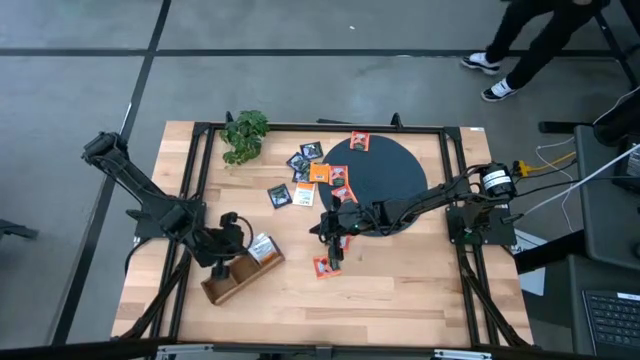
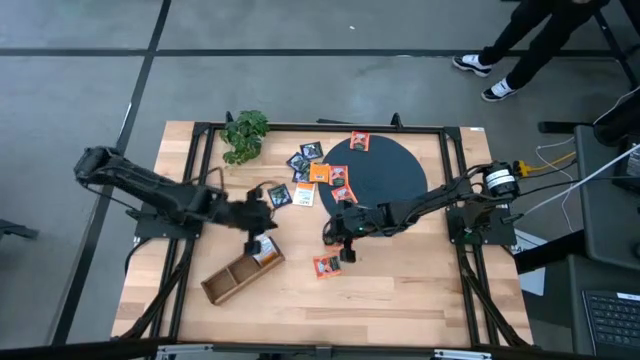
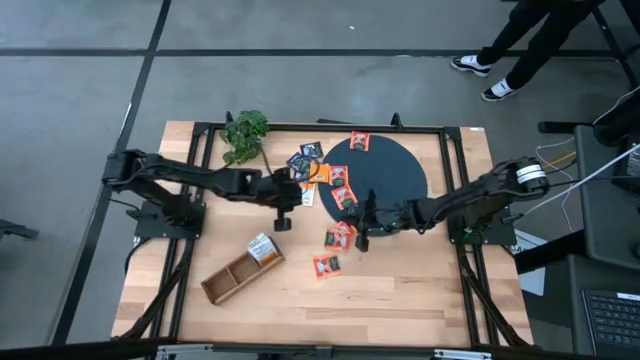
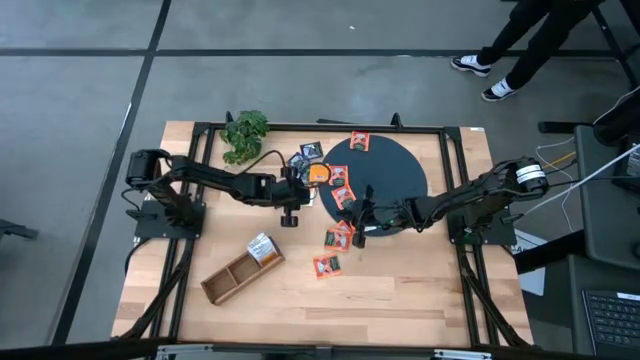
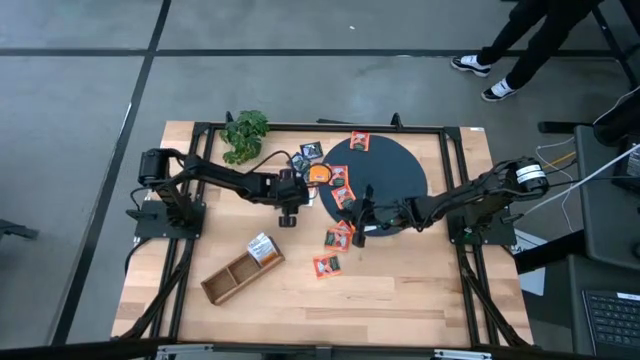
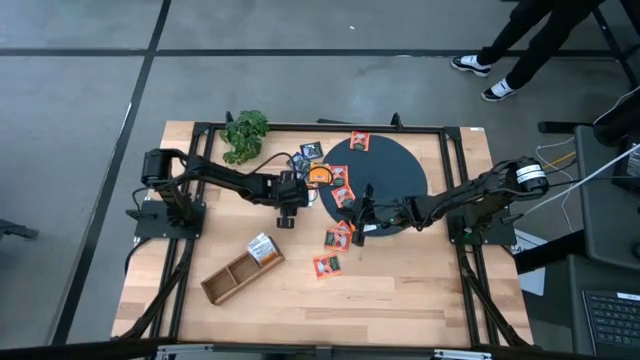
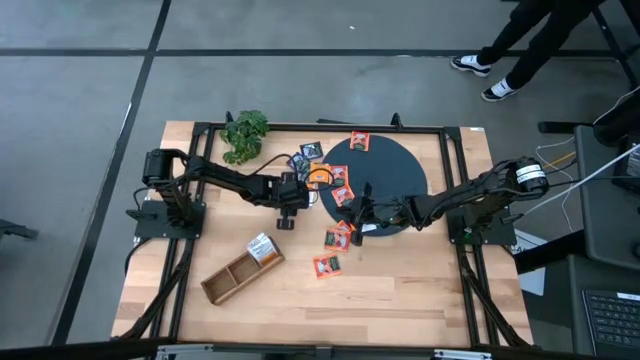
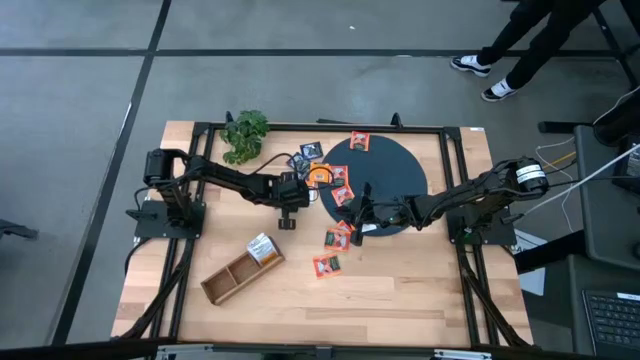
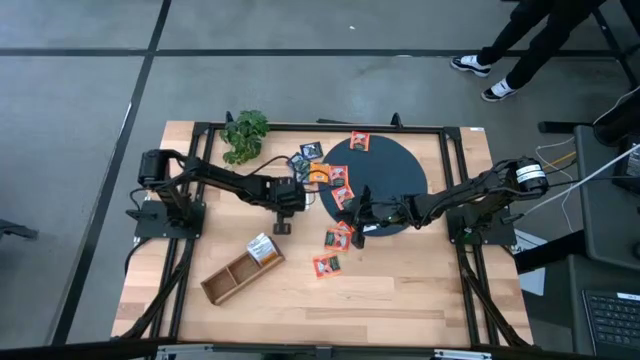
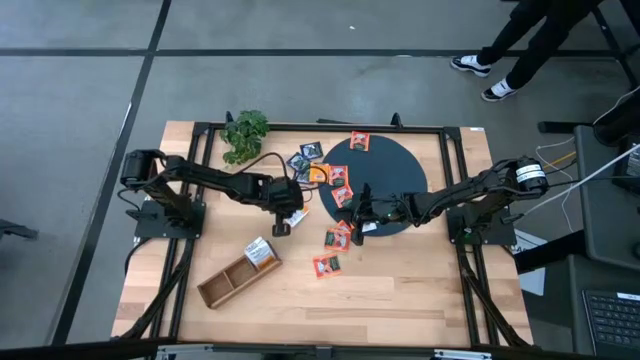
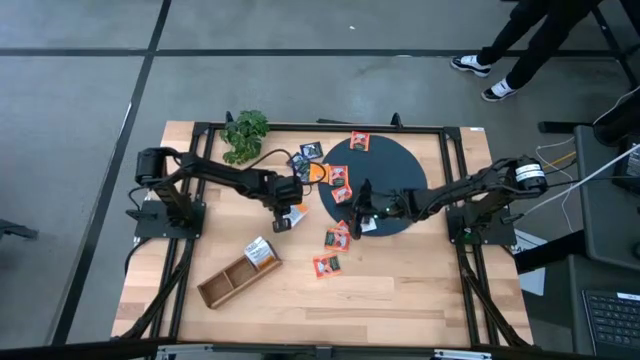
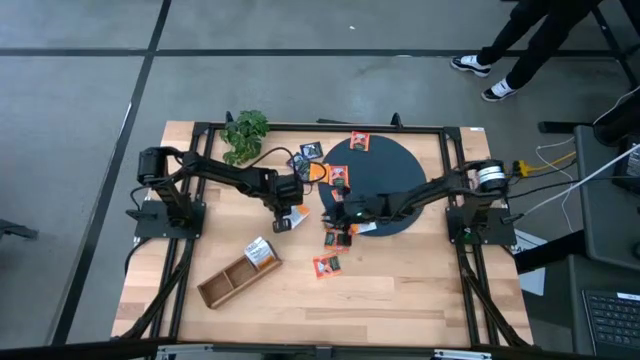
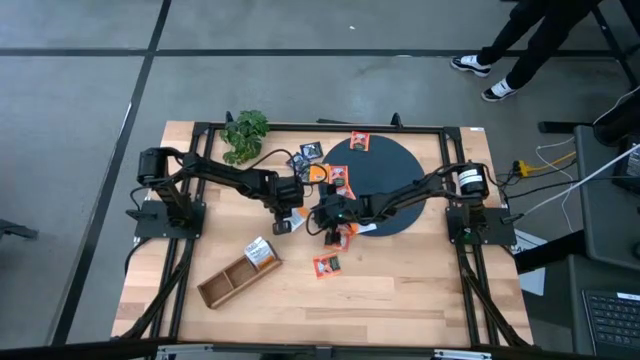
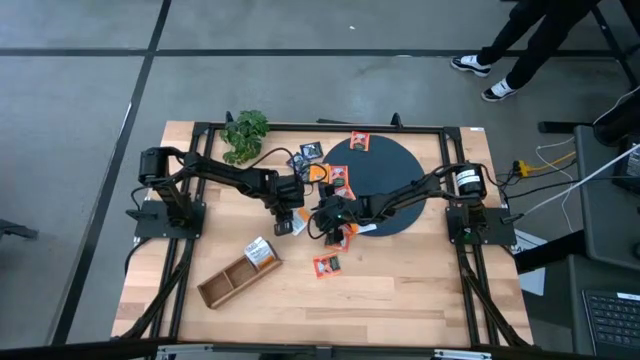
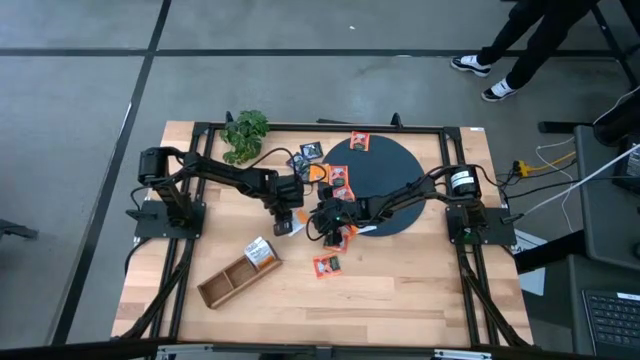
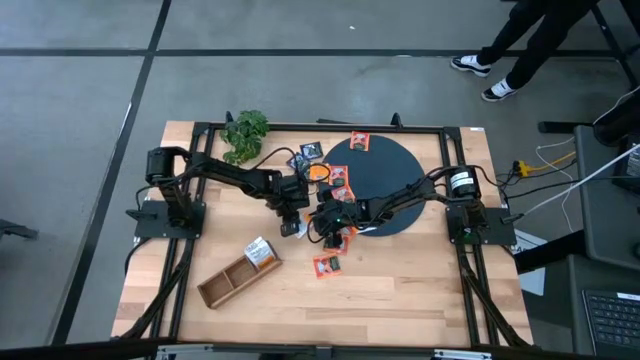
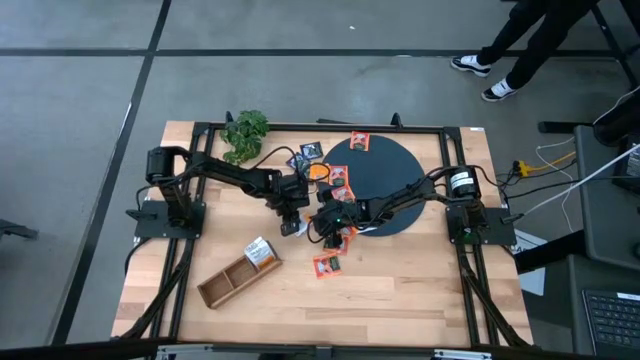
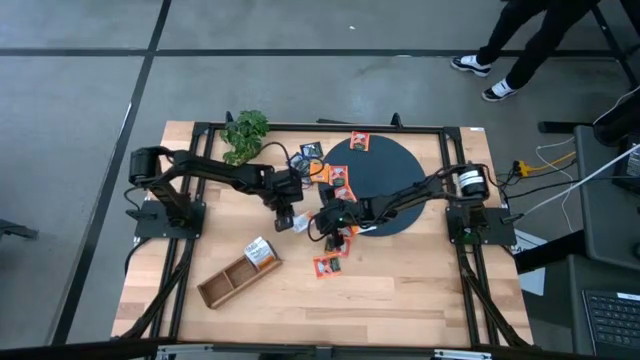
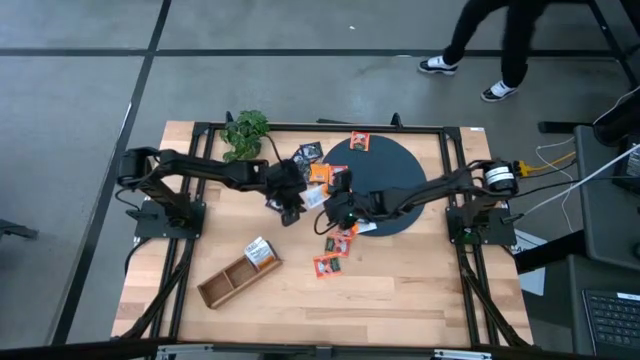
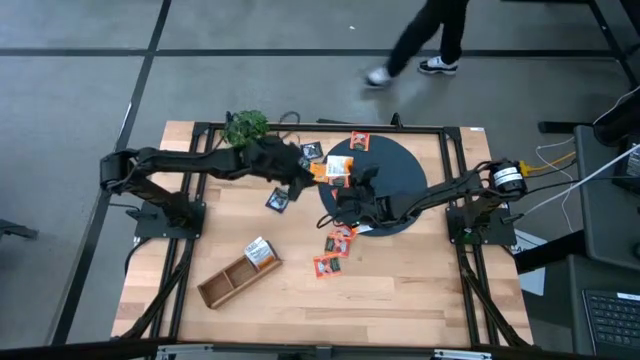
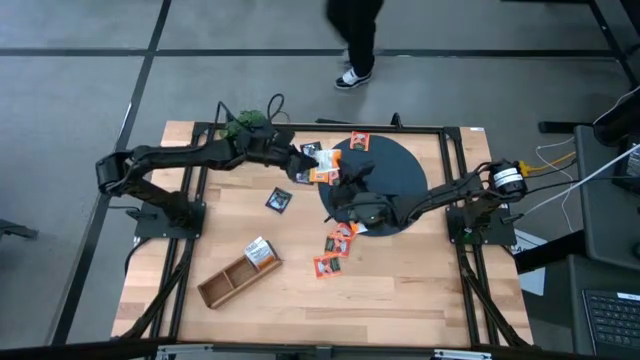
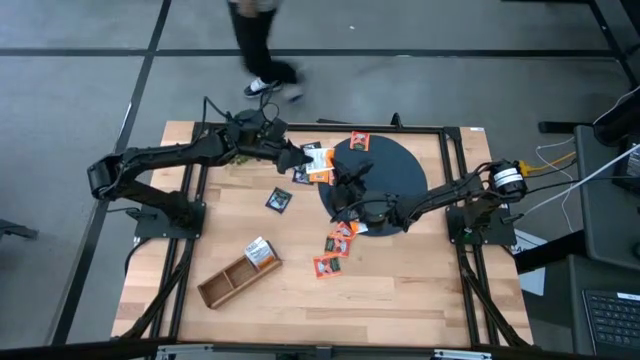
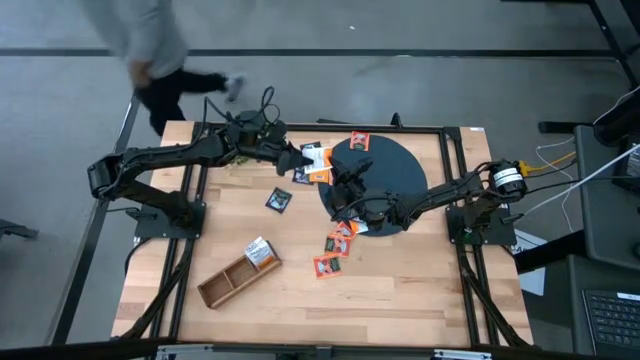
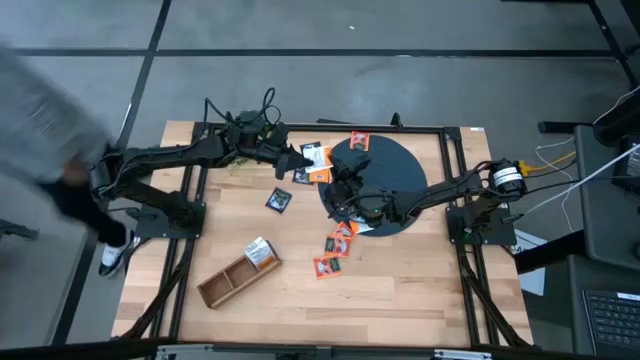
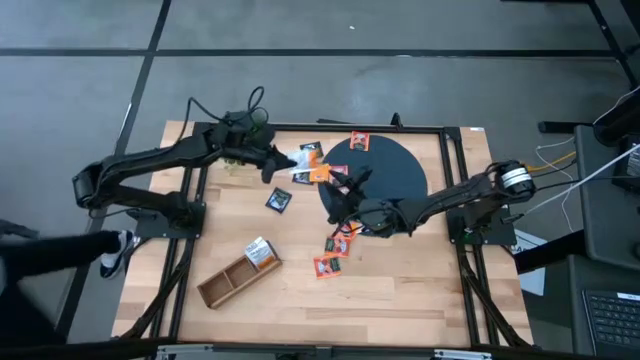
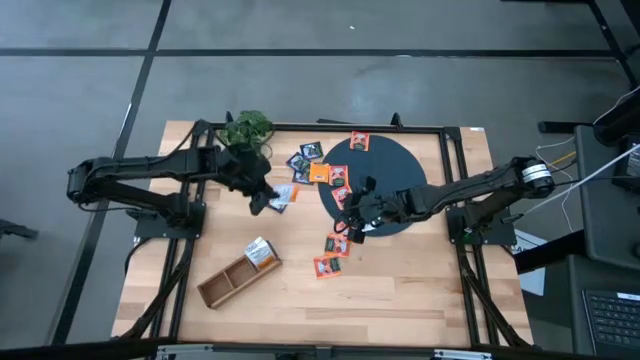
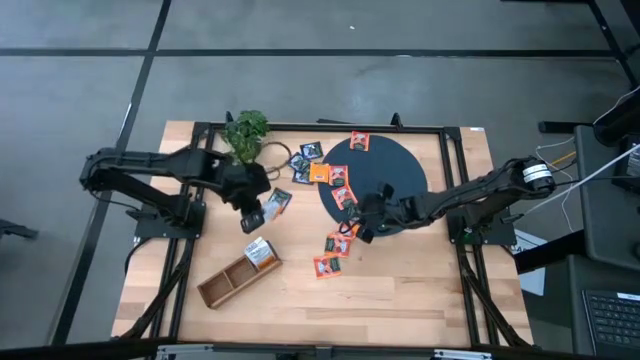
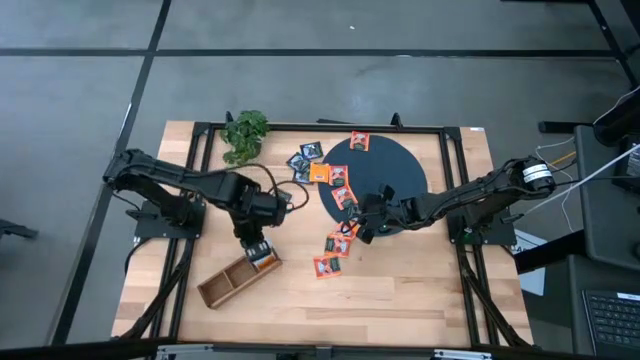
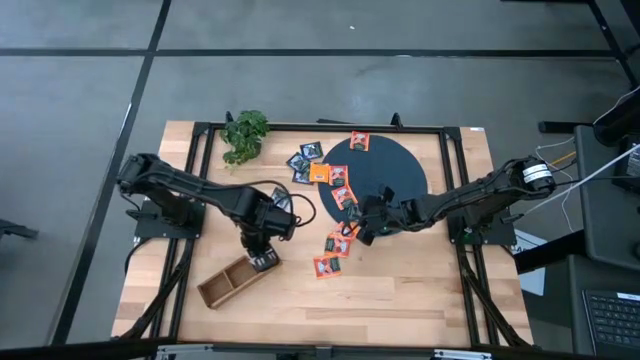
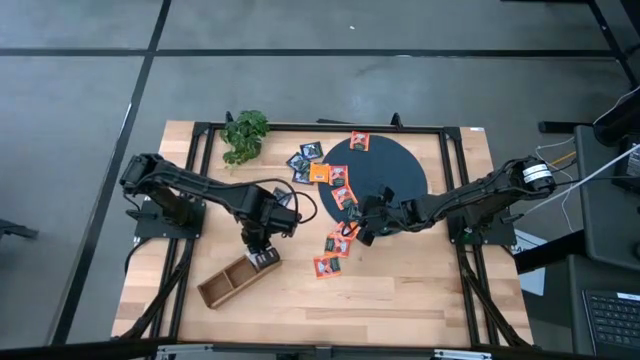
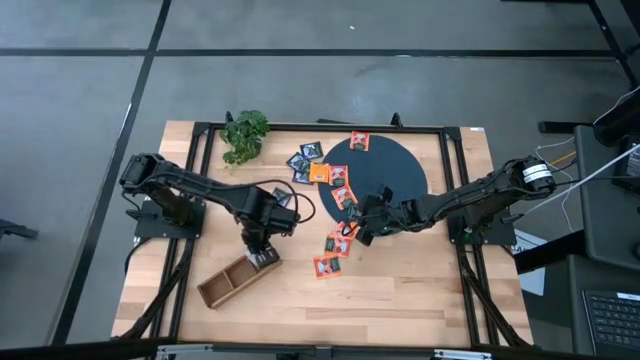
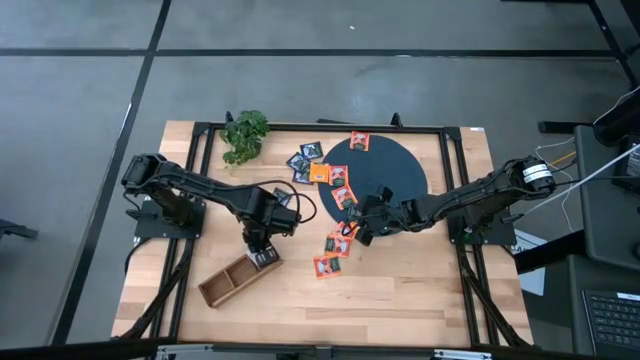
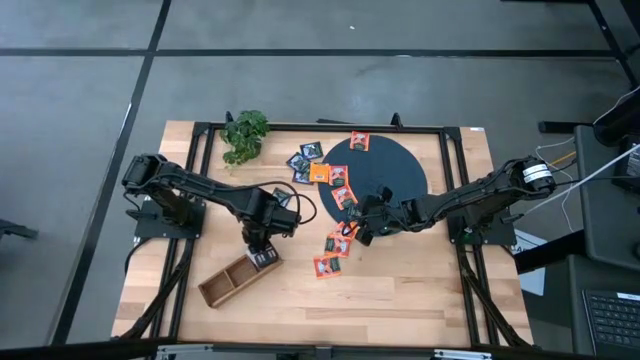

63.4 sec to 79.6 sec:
Task: Pick & Place Tea
Put the white tea bag into the right section of the wooden organizer

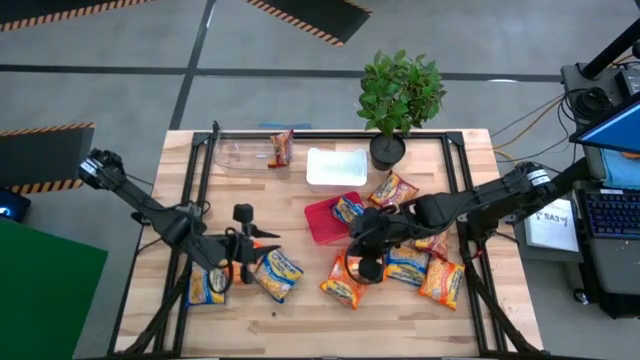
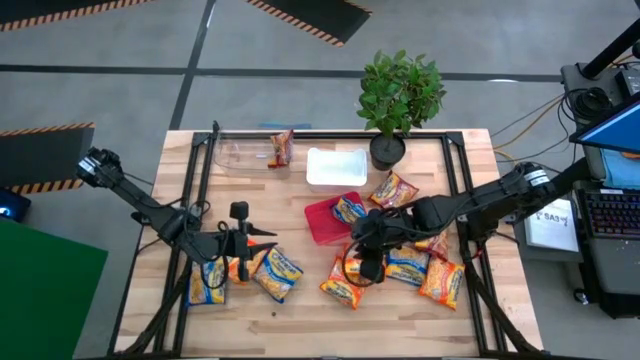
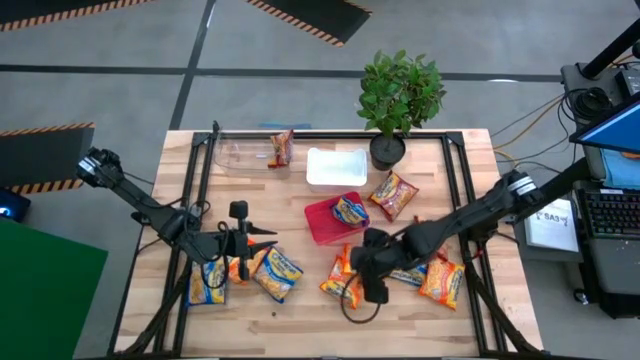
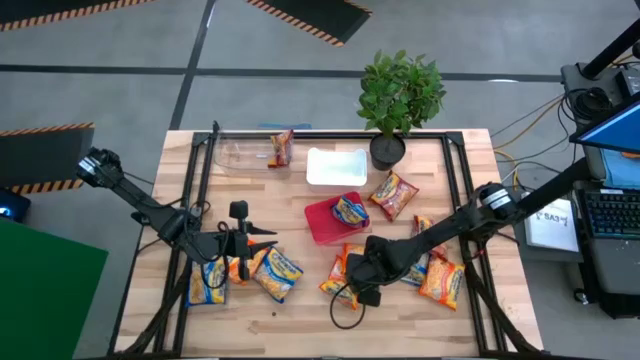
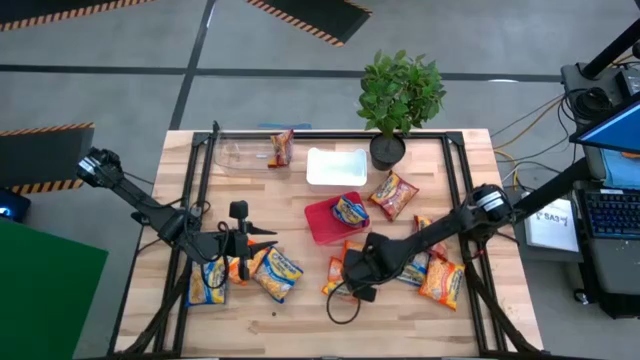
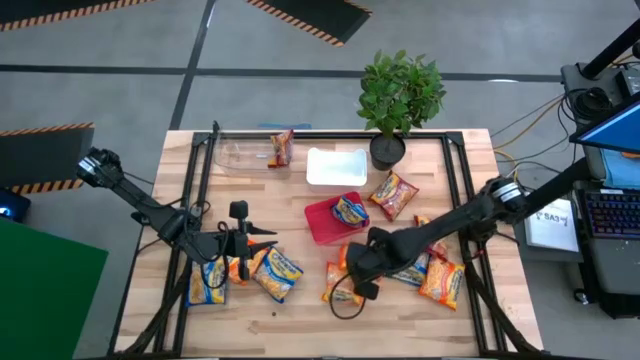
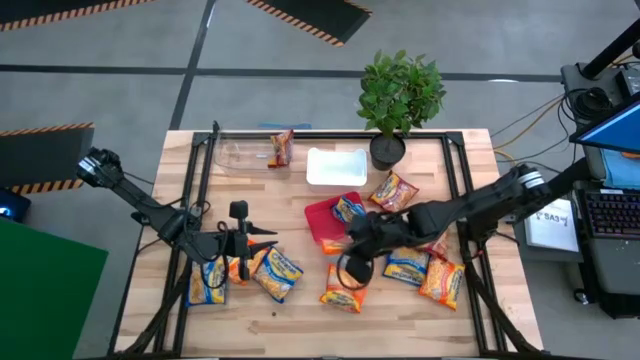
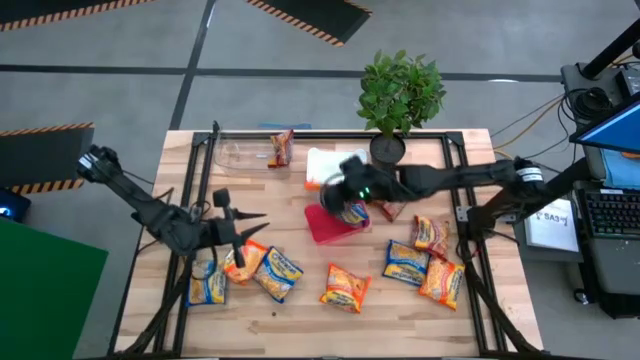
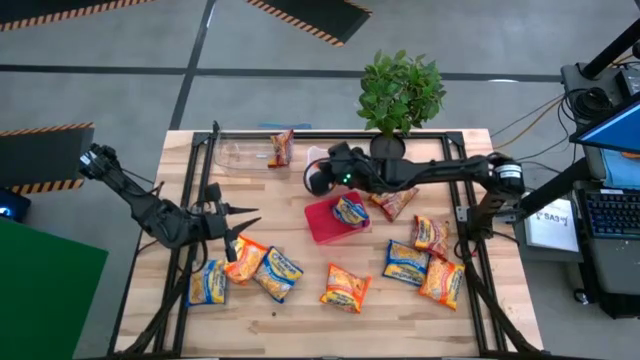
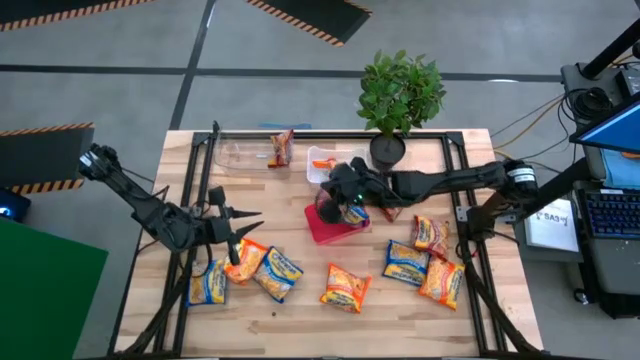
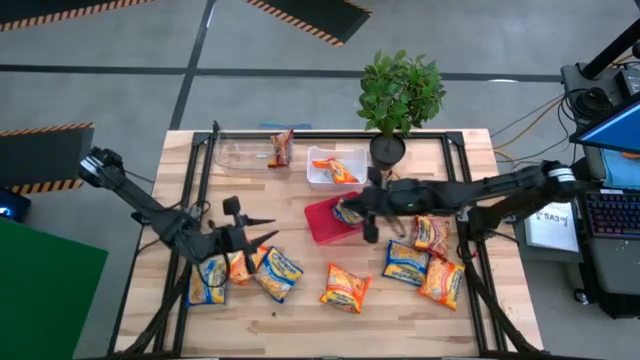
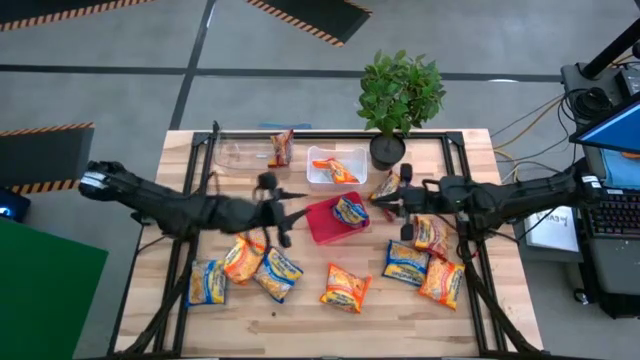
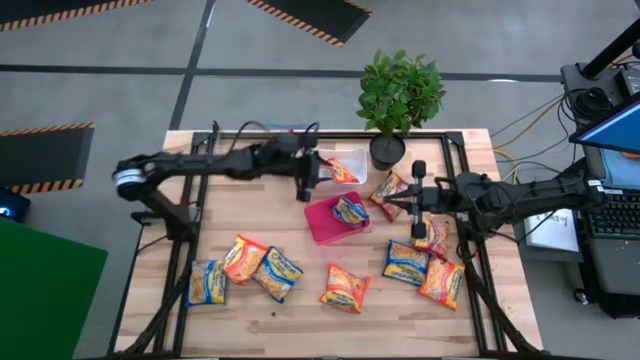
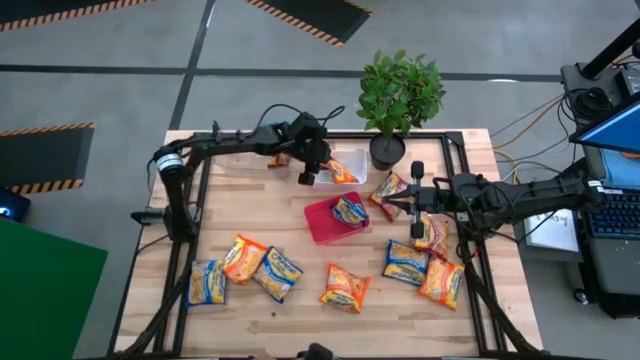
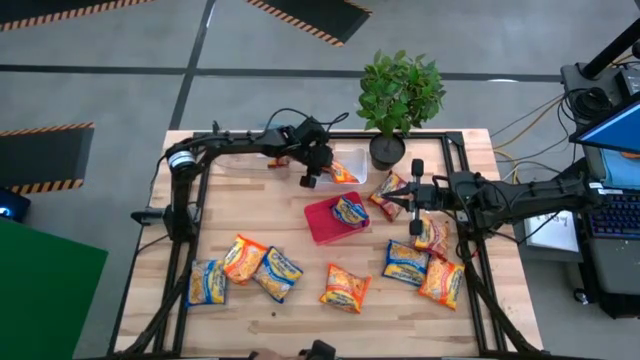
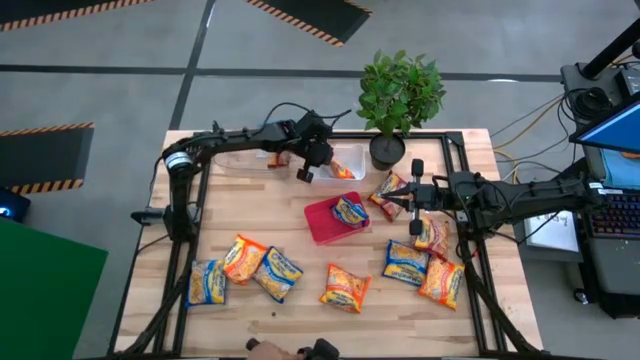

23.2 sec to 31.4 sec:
Task: Sort Maruchan noodles
Put the orange noodle pack into the white bin
